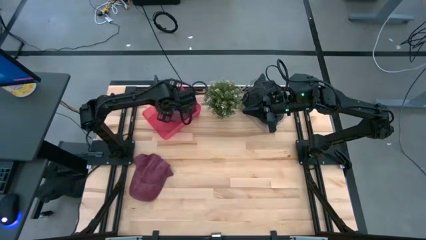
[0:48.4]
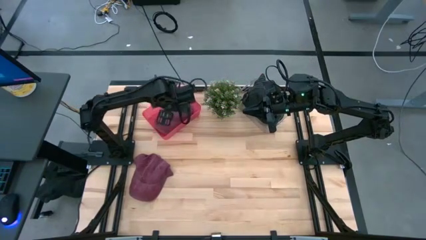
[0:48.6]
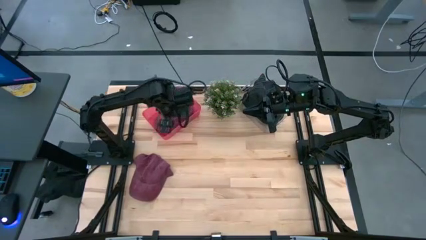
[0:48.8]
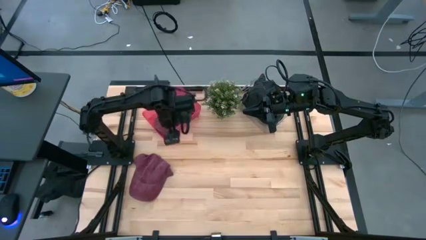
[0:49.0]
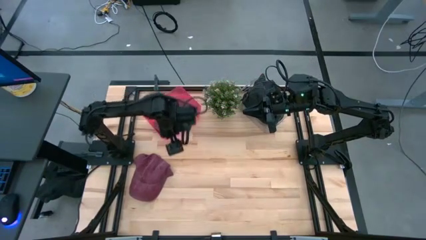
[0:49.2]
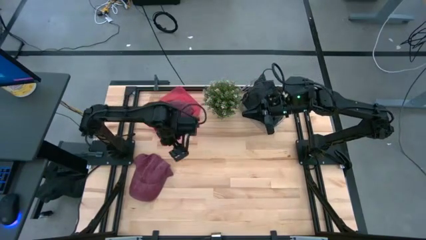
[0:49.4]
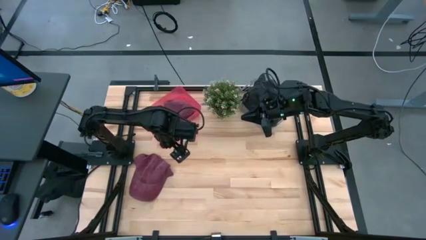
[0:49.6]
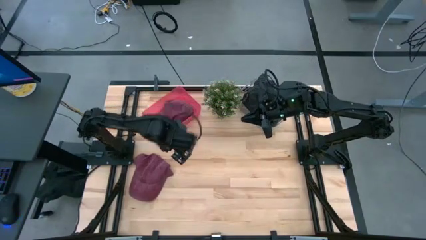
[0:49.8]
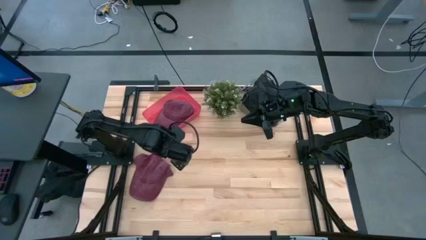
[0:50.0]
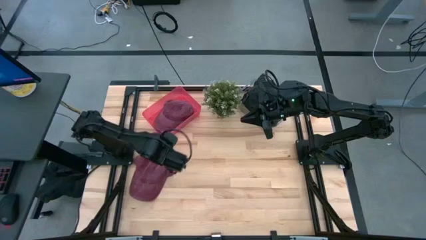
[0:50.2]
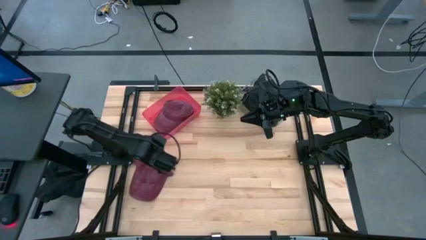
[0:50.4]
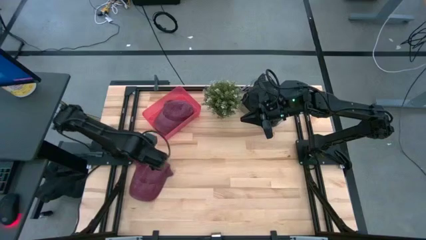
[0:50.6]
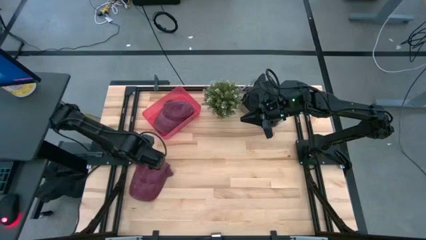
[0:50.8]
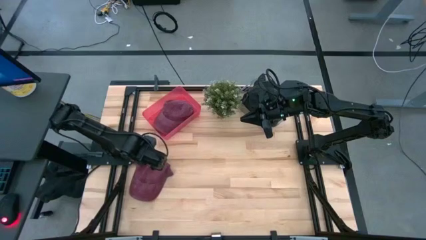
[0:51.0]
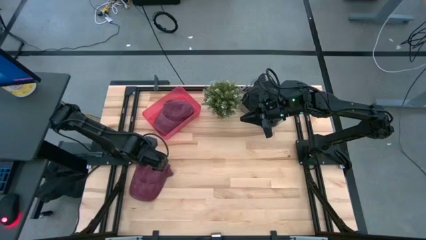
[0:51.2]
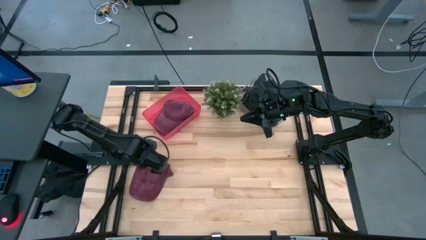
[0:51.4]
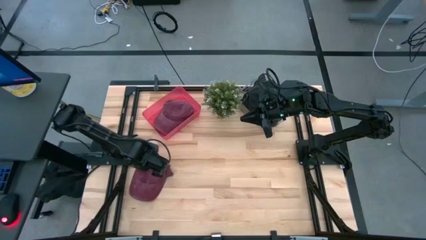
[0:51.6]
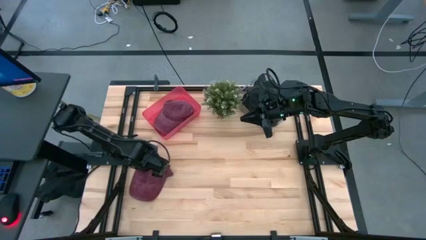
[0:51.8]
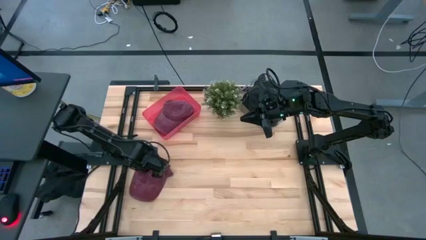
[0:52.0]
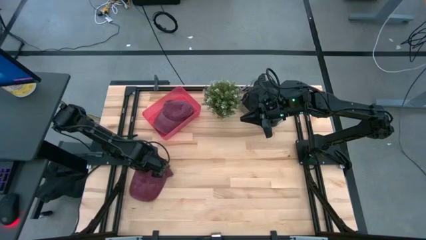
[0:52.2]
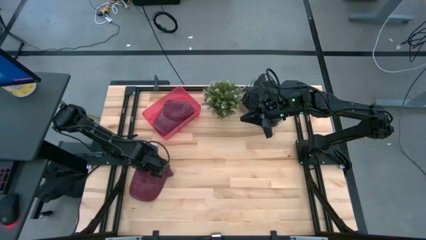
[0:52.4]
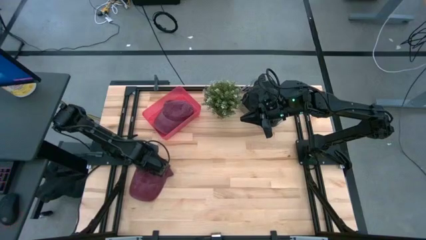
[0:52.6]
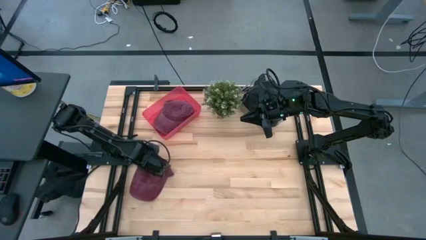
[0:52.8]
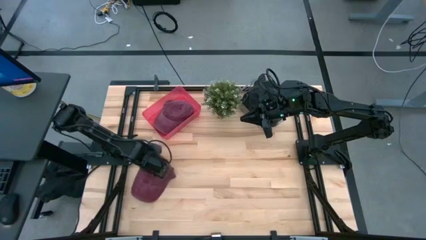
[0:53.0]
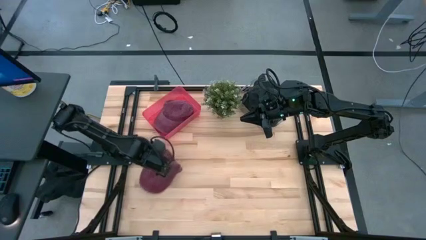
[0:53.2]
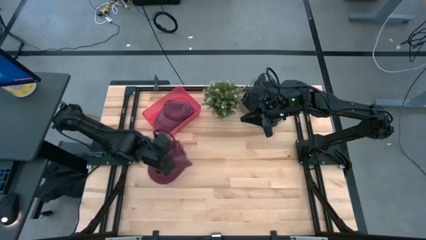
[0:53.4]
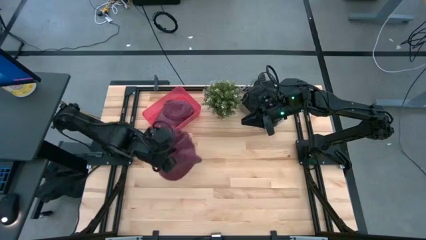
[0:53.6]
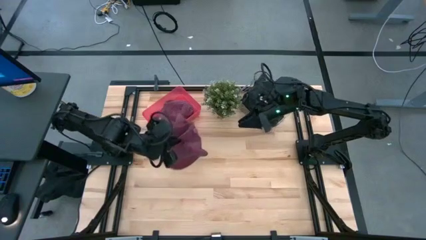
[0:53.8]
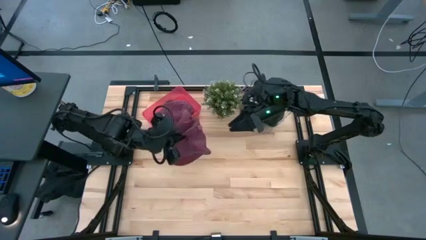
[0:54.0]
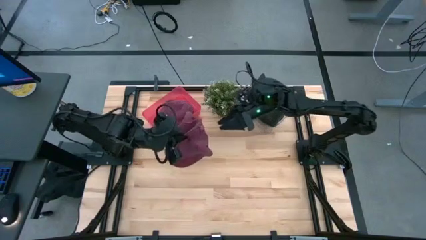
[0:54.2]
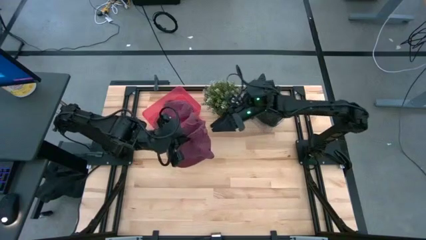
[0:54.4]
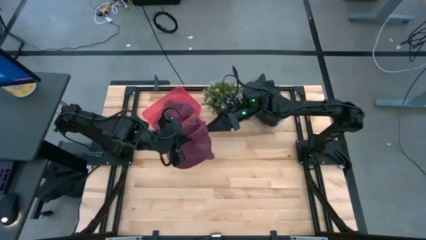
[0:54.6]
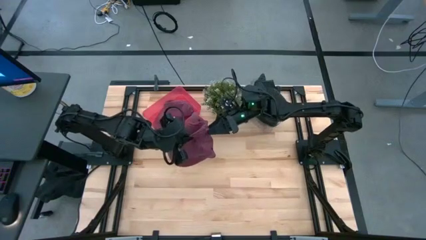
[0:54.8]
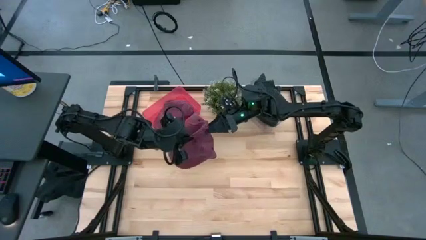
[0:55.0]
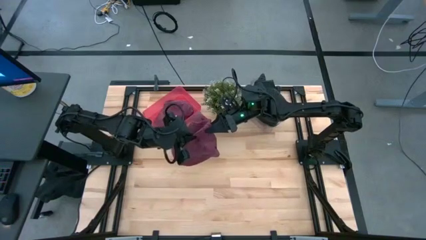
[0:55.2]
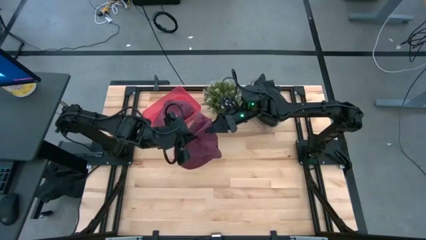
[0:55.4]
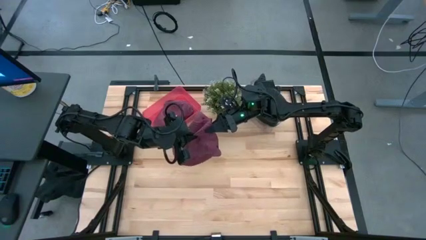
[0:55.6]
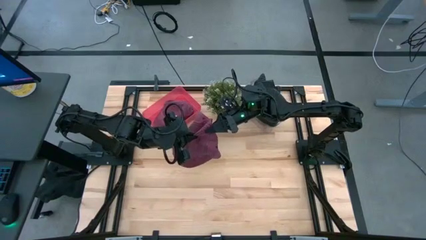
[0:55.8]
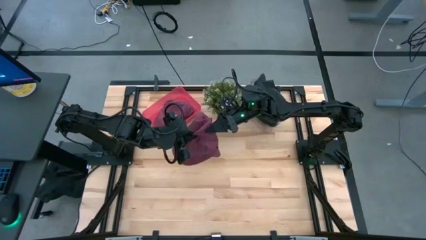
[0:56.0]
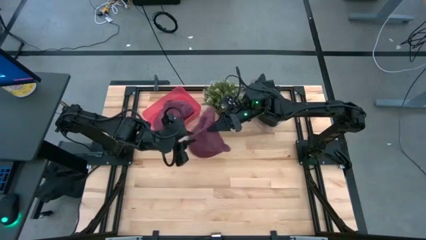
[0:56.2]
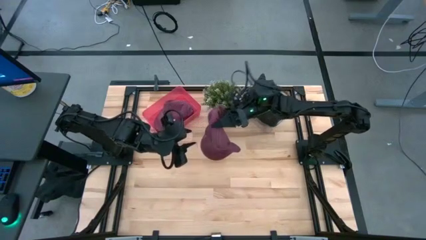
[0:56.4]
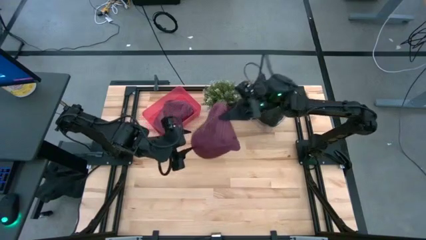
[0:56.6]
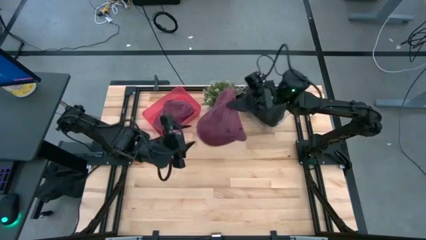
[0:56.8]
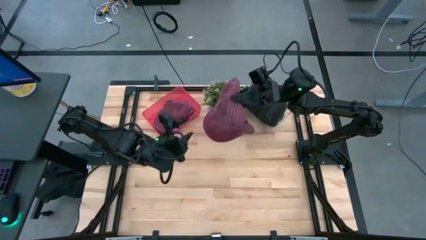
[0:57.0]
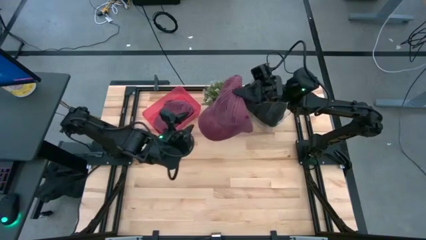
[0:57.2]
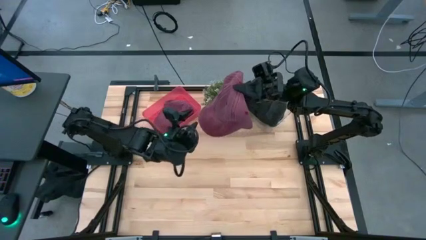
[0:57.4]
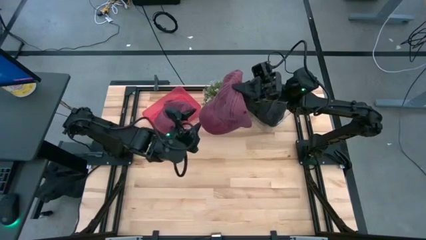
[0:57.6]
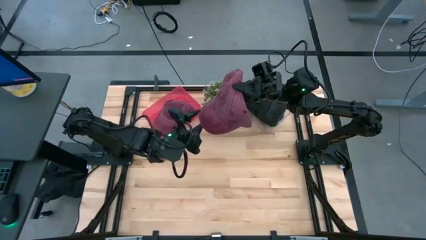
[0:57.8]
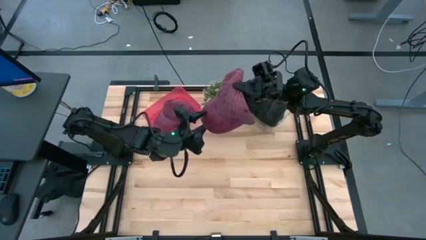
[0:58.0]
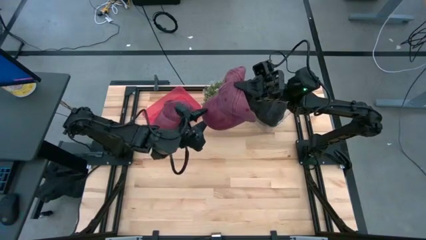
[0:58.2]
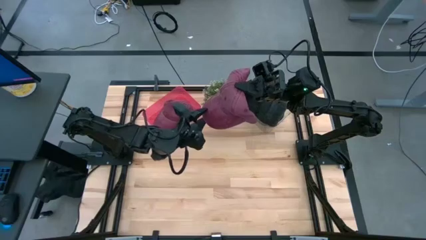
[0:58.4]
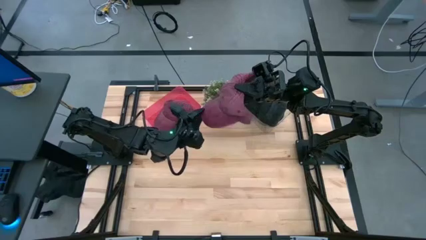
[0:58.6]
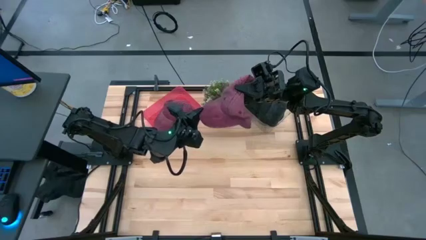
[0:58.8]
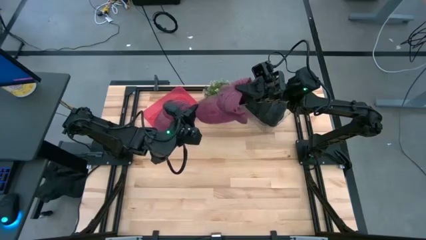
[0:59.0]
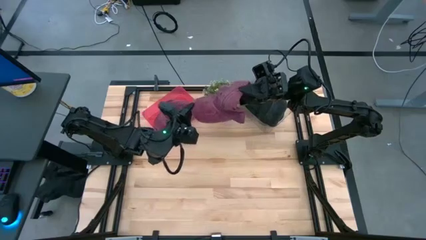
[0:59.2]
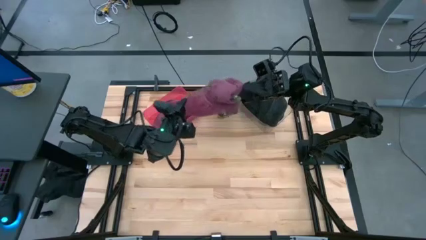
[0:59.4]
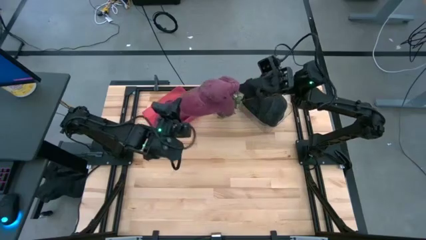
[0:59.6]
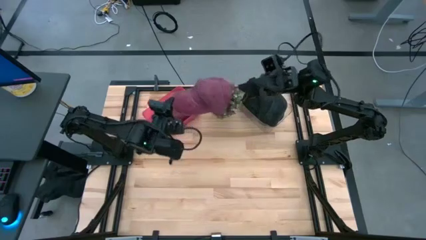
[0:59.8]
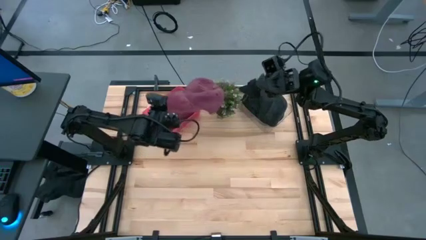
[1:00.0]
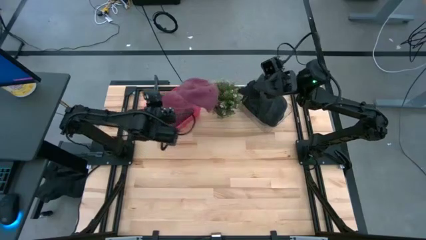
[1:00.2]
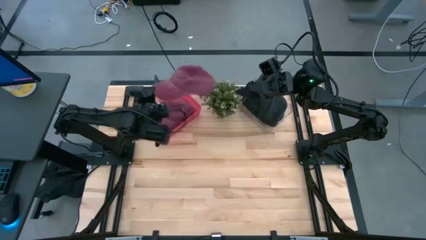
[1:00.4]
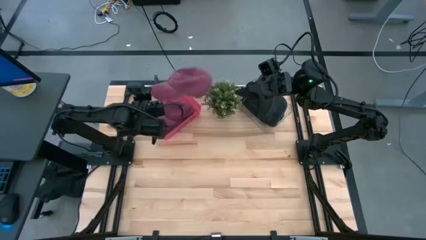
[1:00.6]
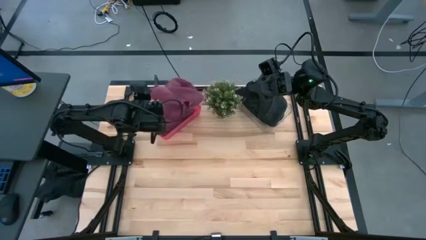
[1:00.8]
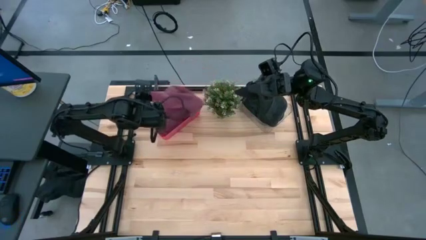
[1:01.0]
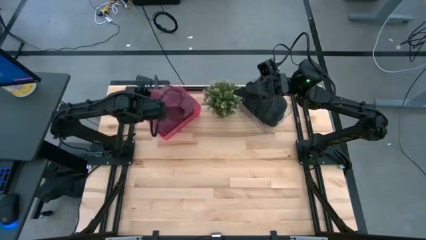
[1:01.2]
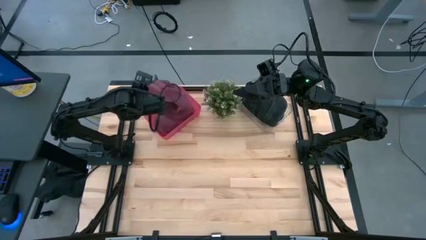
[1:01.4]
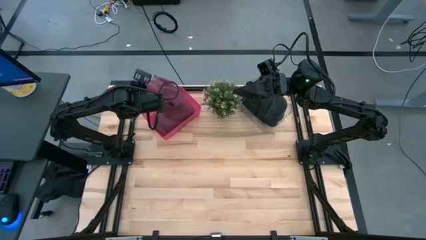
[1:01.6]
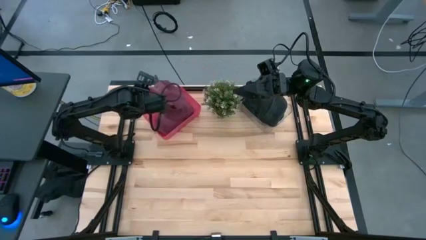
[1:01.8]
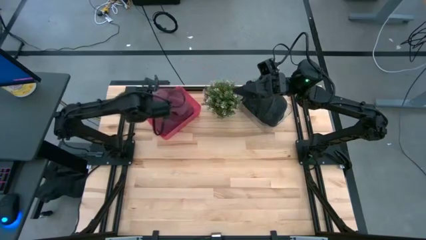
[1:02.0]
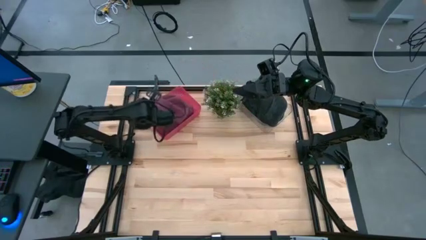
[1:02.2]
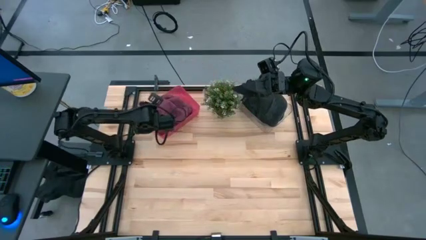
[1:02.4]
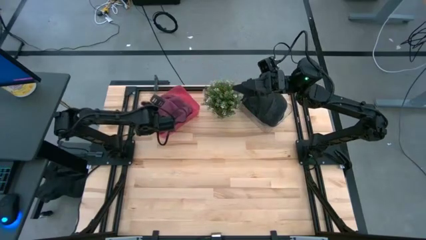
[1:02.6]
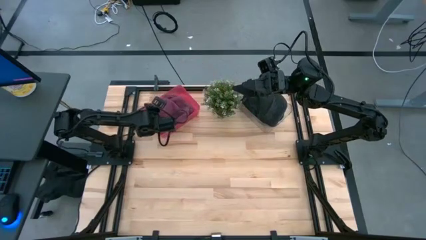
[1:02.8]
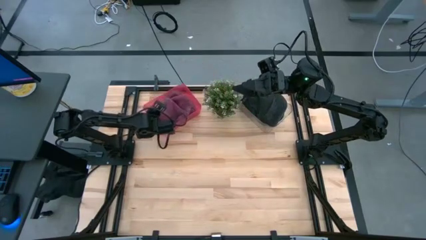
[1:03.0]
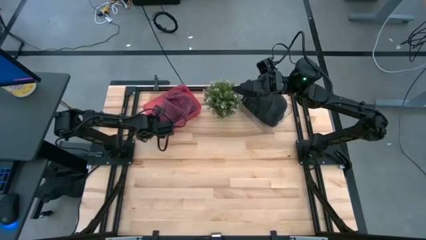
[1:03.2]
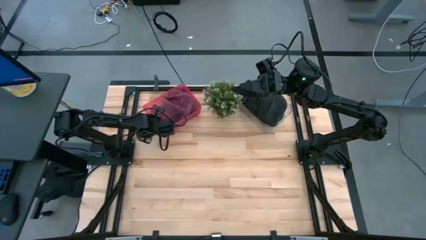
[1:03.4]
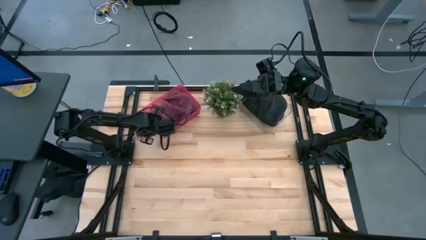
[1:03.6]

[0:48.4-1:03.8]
Task: Pick & Place hat
Put the red cap into the red bin
